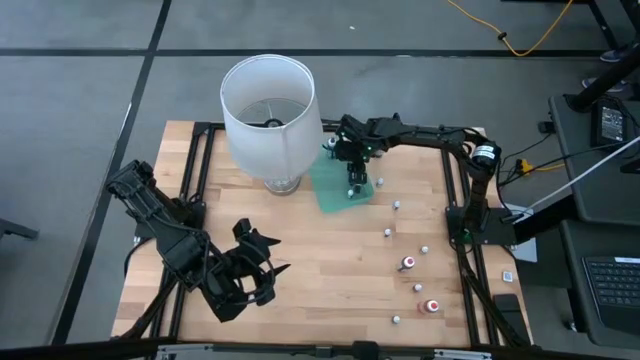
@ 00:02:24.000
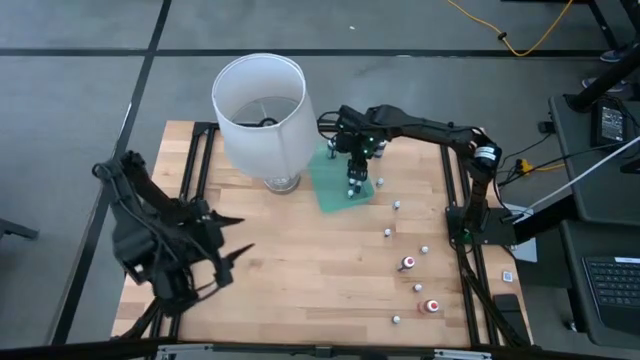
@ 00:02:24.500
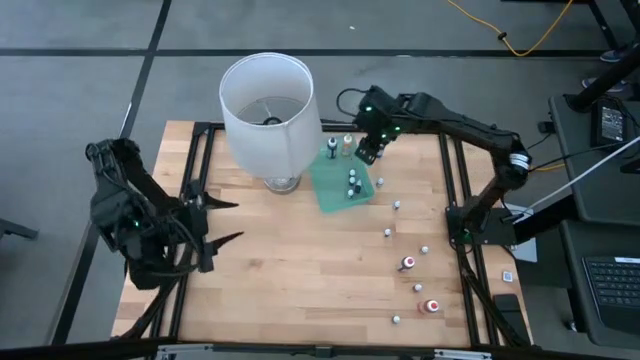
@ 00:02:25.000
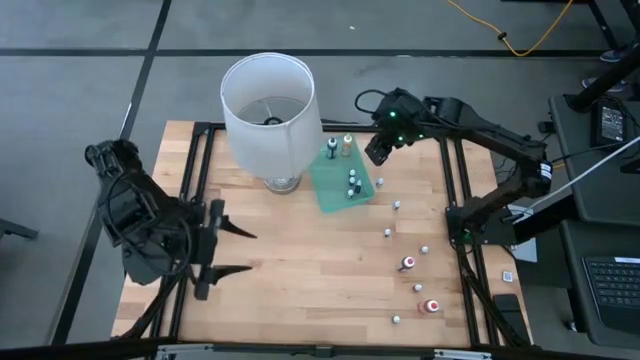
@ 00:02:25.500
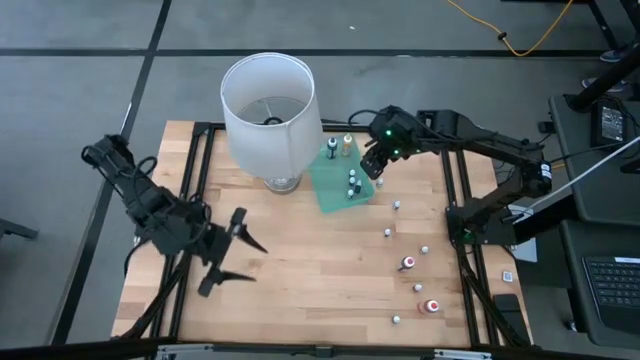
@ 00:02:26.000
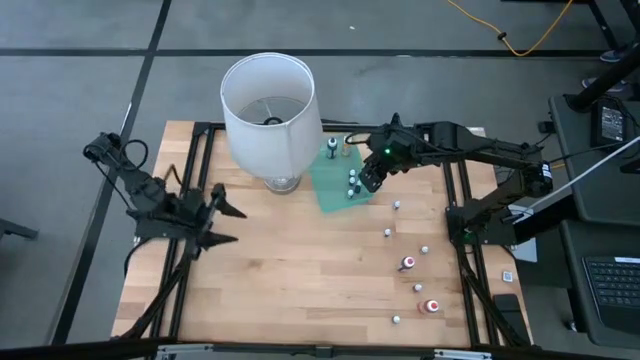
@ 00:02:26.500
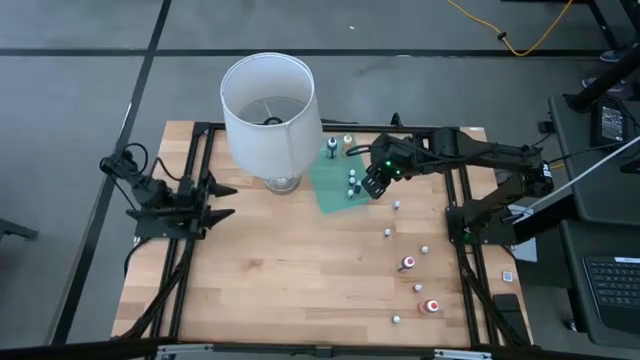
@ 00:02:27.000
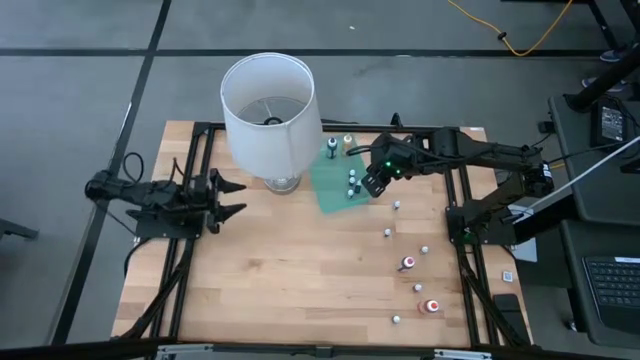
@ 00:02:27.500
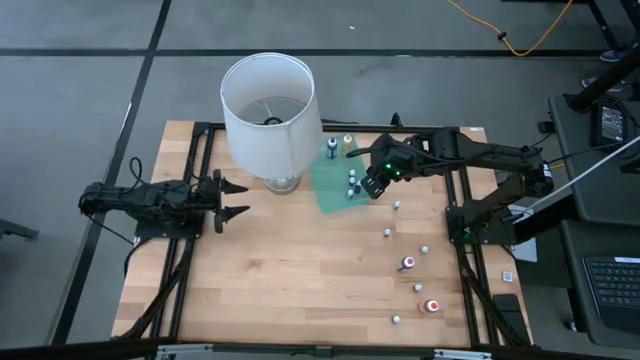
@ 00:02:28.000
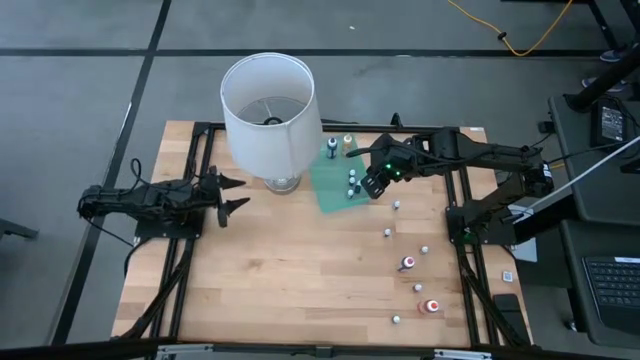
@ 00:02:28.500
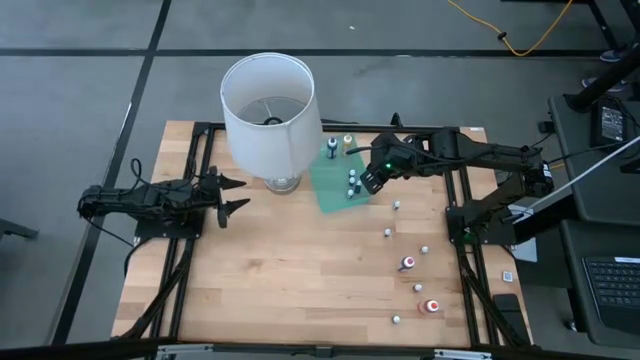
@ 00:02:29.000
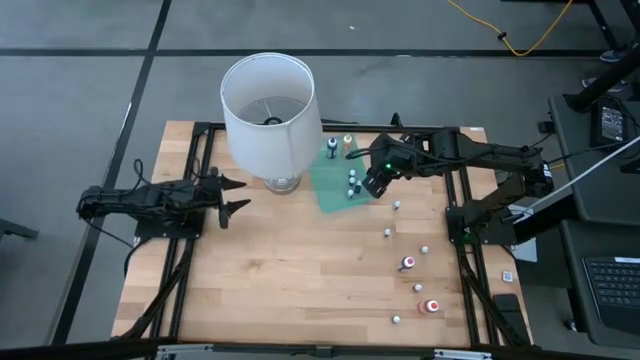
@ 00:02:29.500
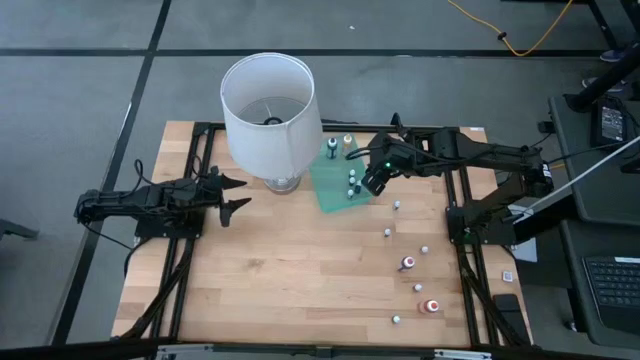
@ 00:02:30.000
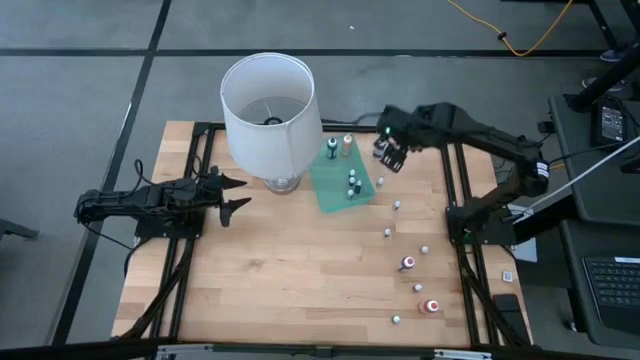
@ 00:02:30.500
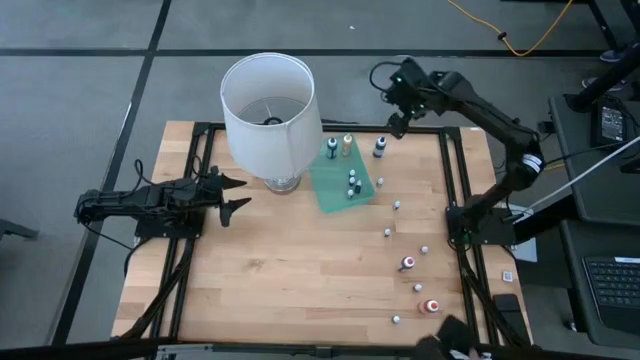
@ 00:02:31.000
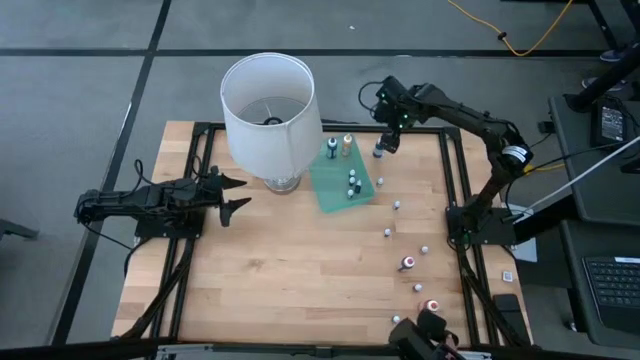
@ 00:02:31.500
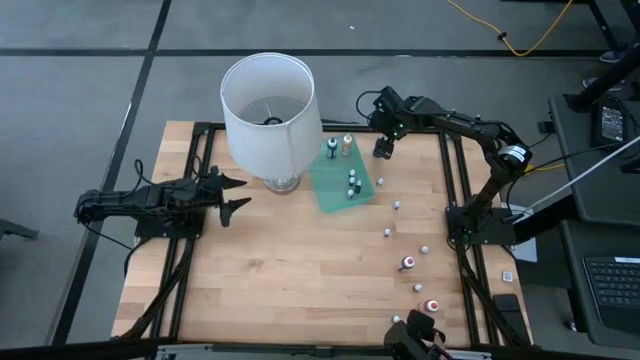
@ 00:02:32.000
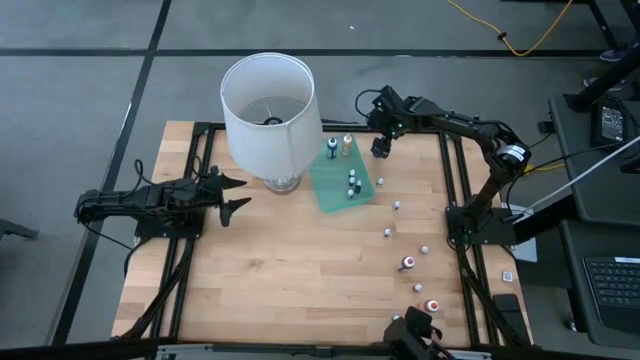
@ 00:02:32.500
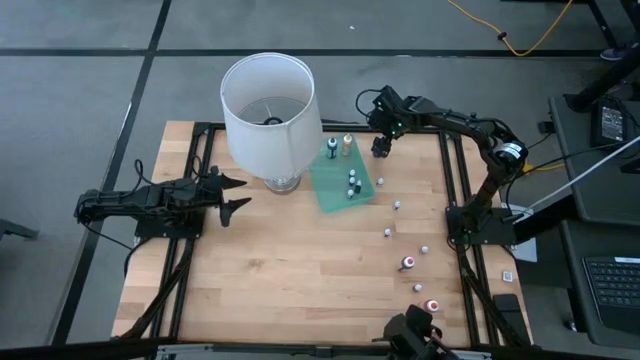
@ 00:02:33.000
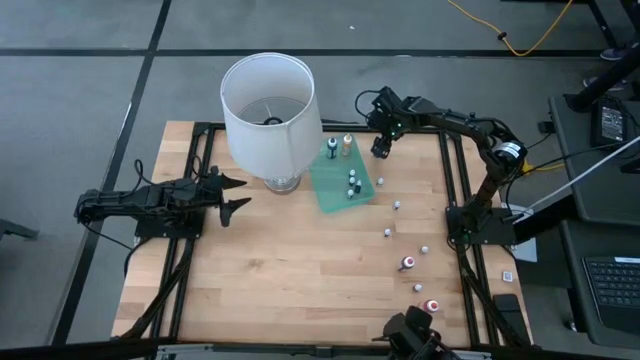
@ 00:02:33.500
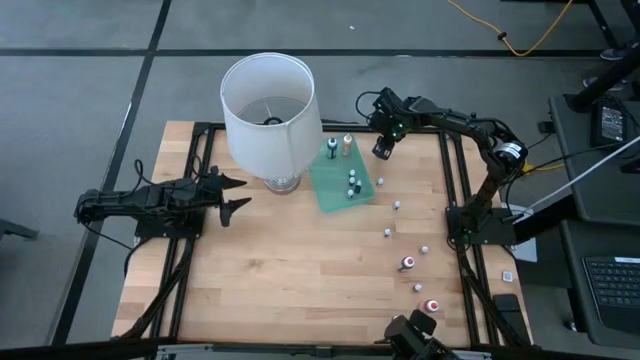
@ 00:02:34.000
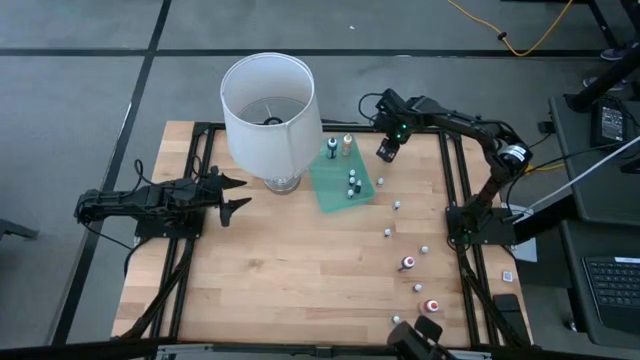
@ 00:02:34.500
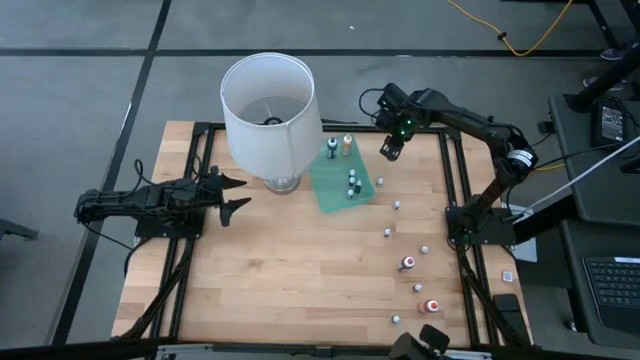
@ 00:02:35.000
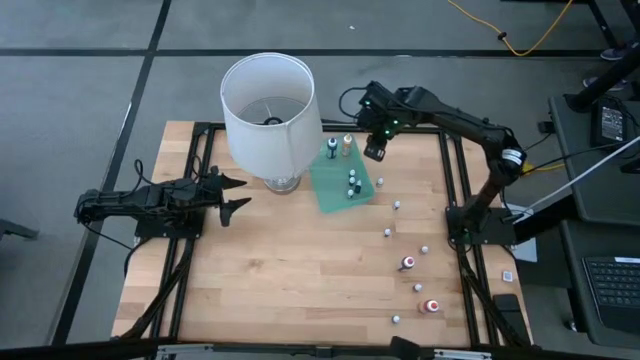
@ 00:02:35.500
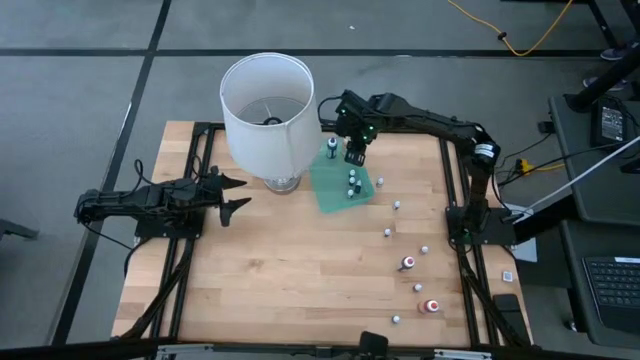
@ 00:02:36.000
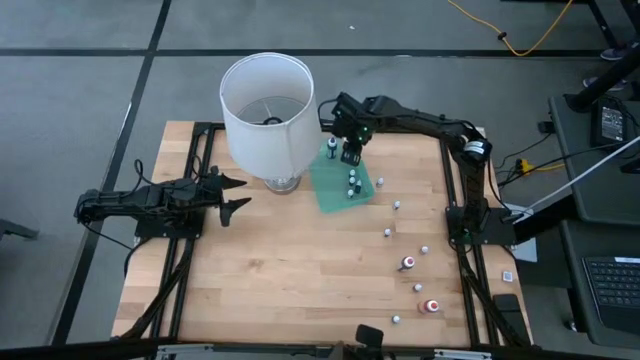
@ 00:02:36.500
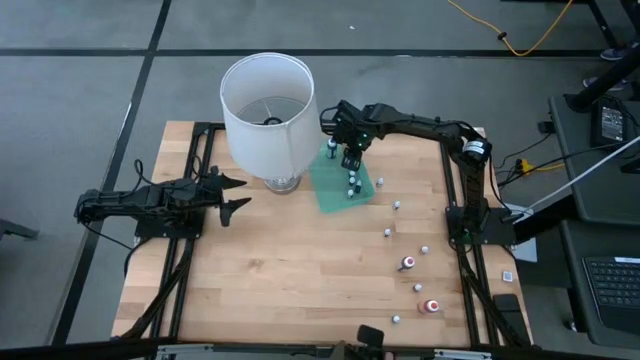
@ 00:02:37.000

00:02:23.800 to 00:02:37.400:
Task: Pick & Place food coloring
Put the large blue food coloring bottle into the green bin

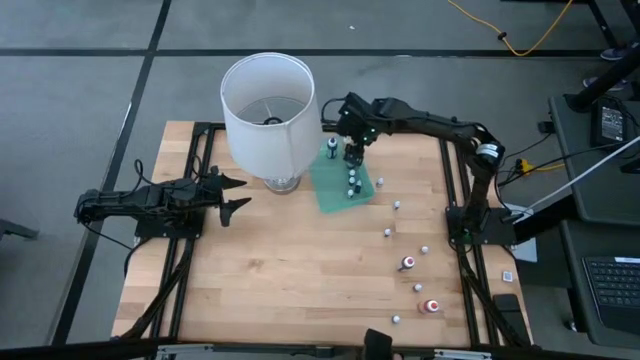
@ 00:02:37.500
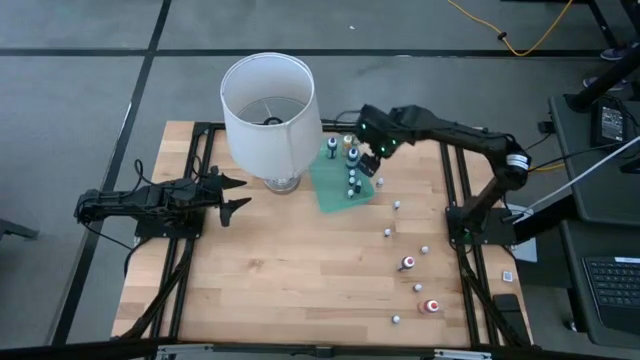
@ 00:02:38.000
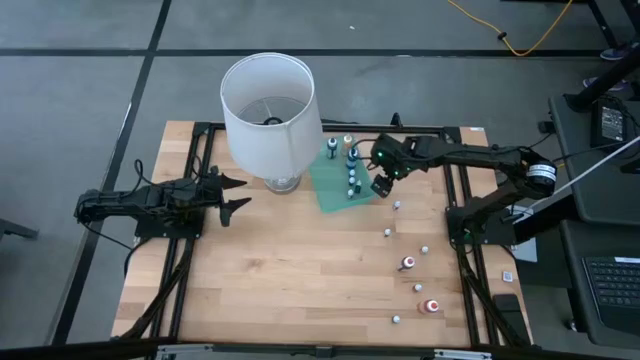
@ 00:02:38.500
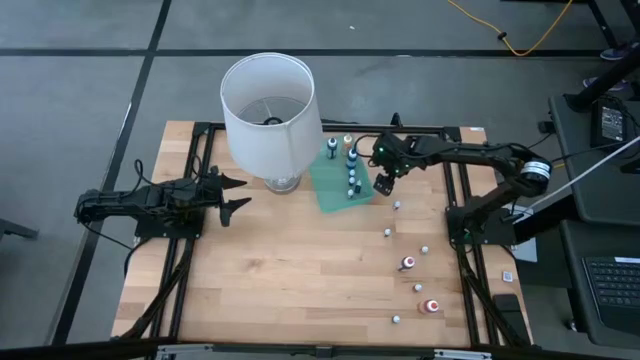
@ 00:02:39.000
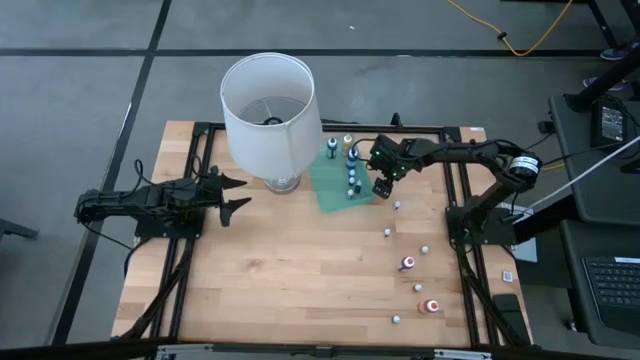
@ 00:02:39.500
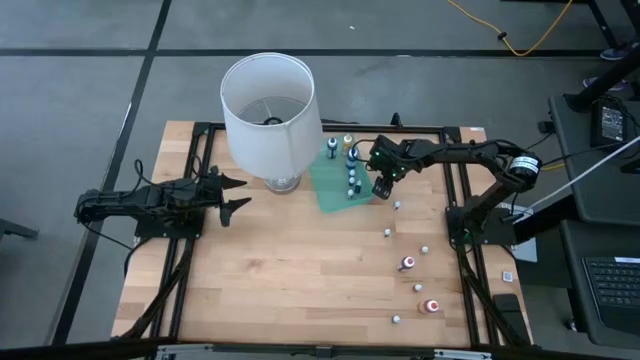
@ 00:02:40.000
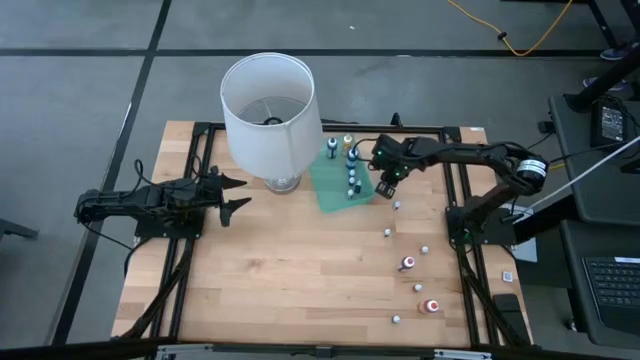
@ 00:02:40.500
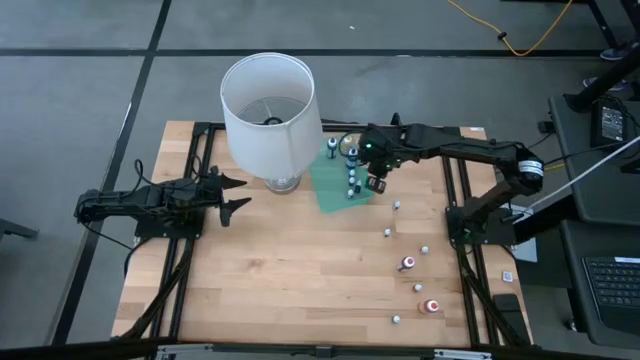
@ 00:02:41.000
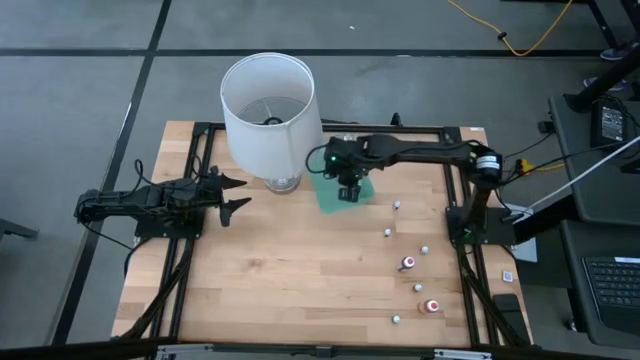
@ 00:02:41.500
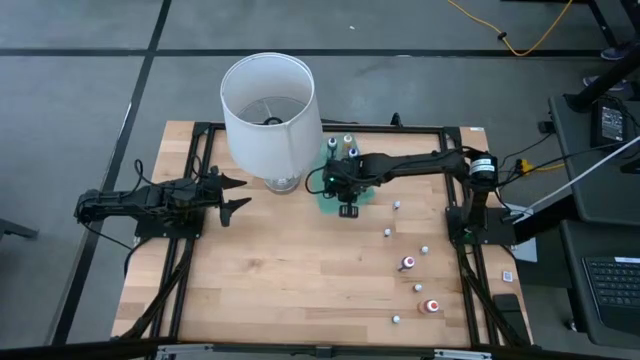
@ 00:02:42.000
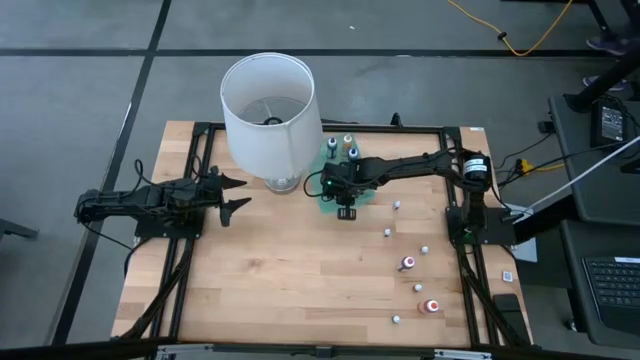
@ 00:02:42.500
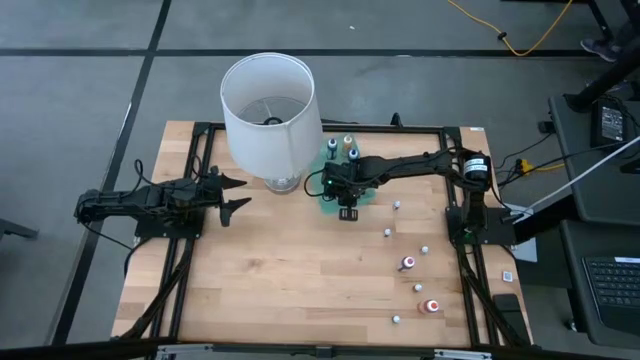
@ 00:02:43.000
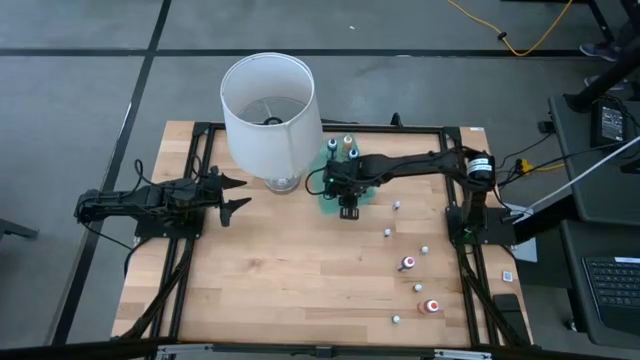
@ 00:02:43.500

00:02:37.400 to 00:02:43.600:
Put the small brown food coloring bottle into the green bin

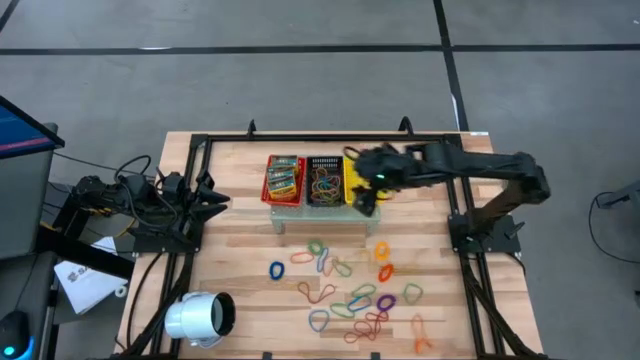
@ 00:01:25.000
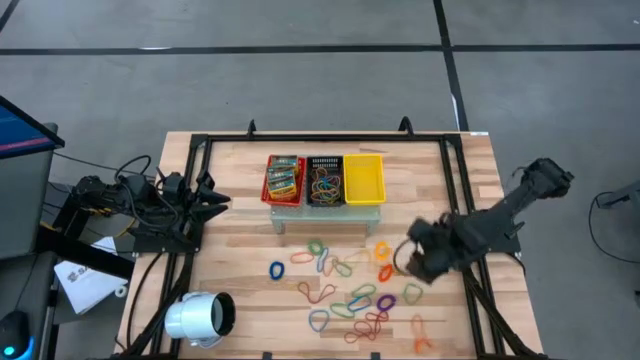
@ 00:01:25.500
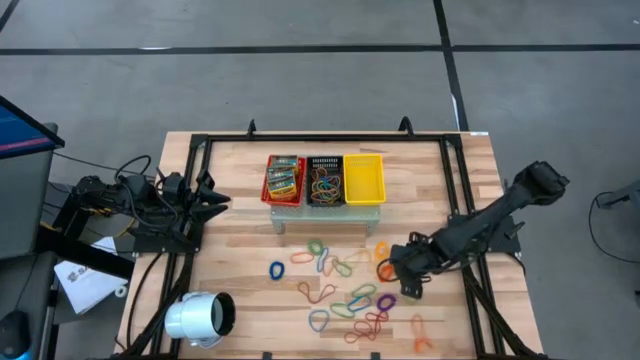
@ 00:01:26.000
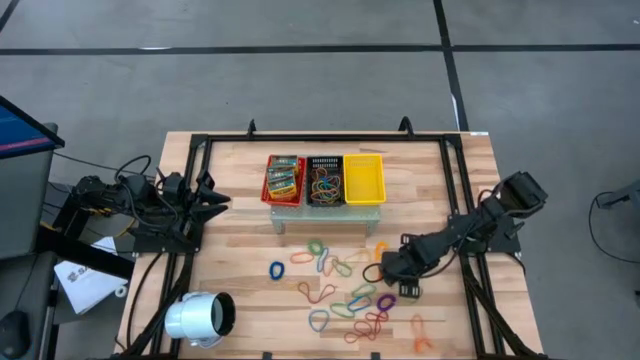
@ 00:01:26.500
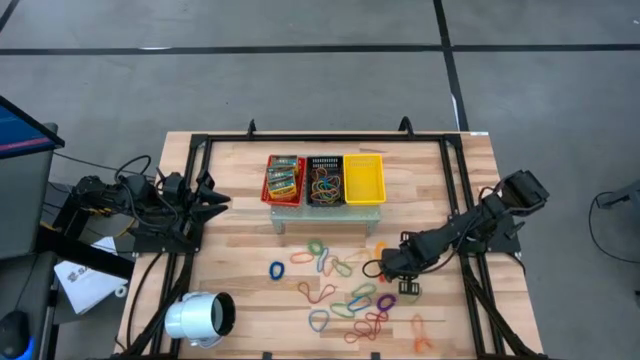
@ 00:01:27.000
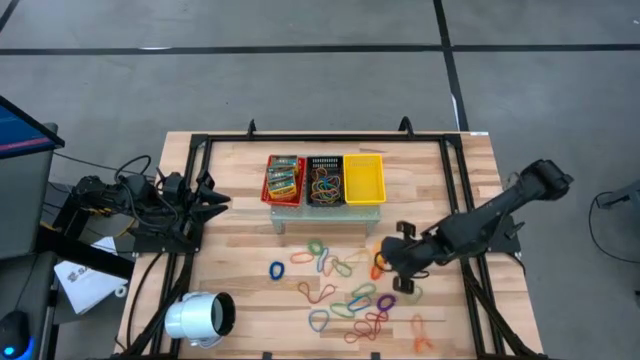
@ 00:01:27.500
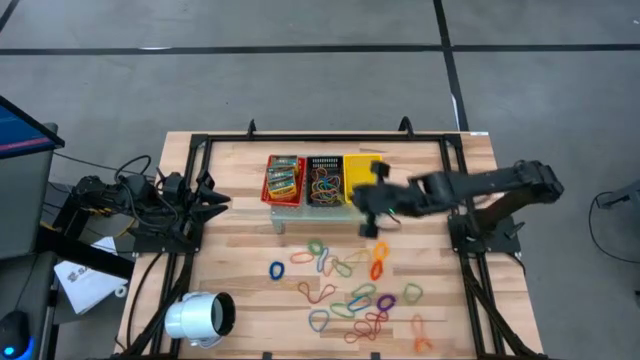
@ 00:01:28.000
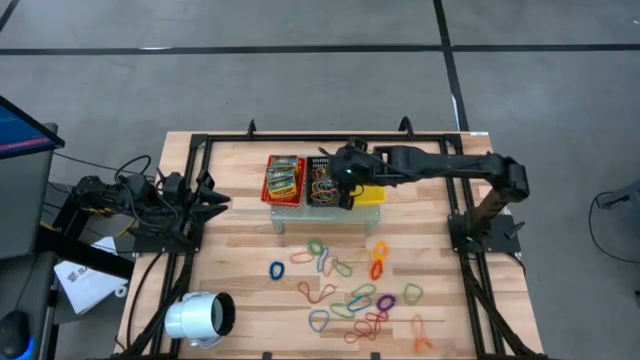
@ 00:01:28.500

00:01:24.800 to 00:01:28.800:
Task: Pick & Place Office Desk Supplies
Put the yellow rubber band into the black bin on the shelf
